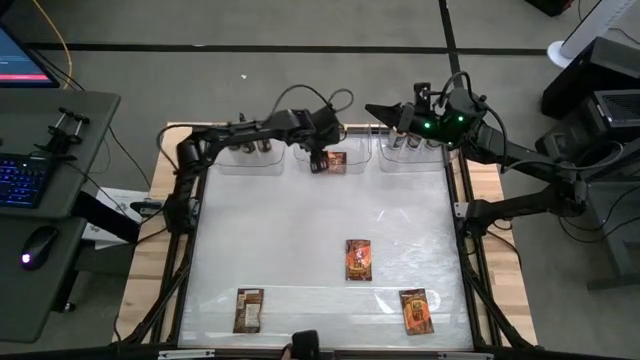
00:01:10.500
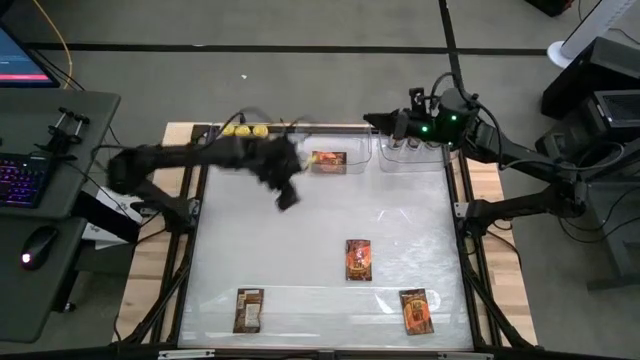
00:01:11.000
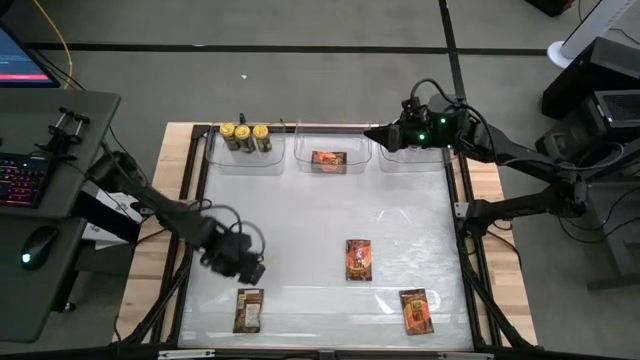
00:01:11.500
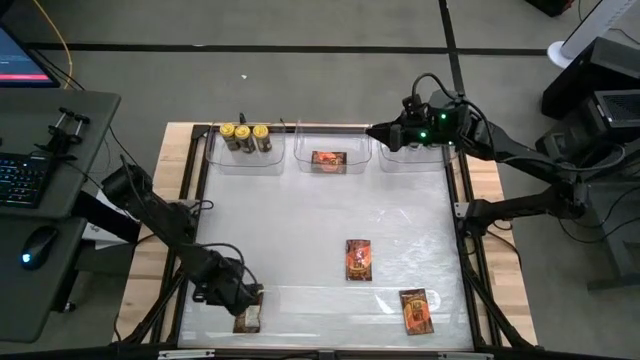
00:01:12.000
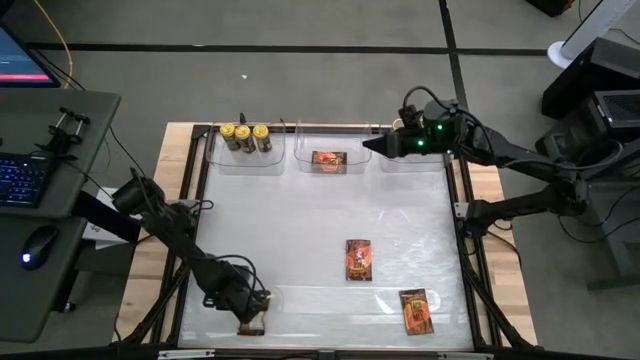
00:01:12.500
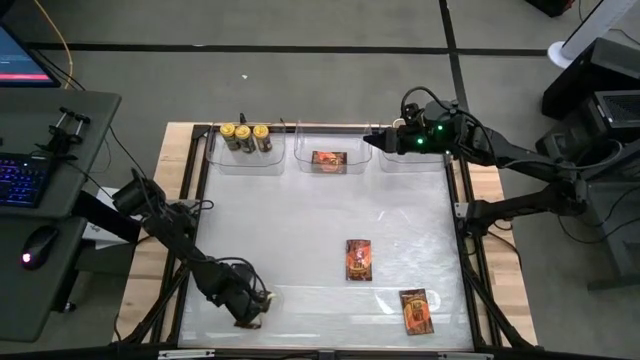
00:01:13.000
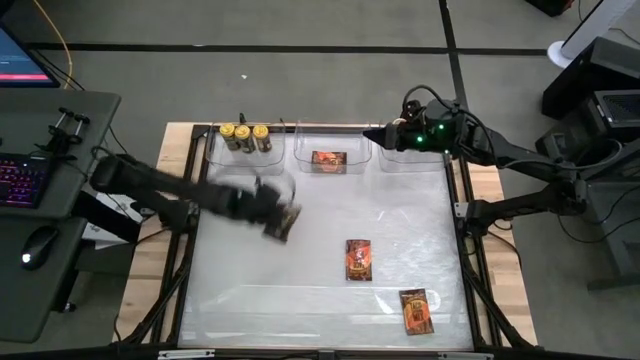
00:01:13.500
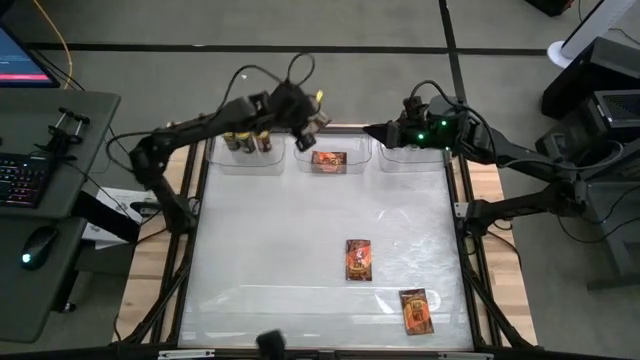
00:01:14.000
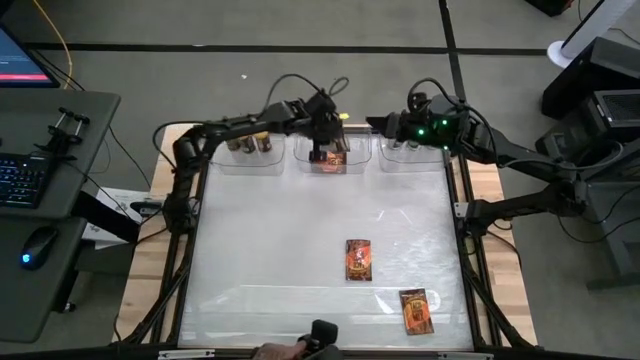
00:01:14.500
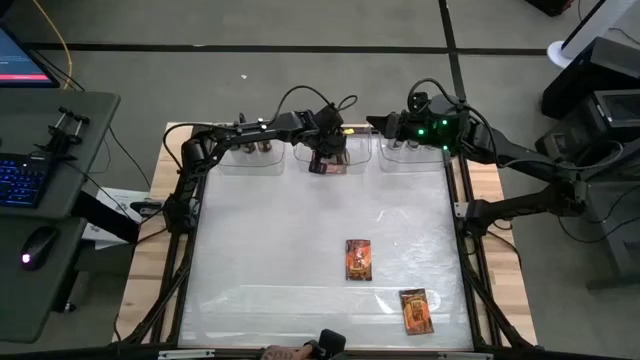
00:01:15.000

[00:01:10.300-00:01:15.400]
Task: Sort spices by type
Put the bottom left orange seasoning pack into the middle transparent bin

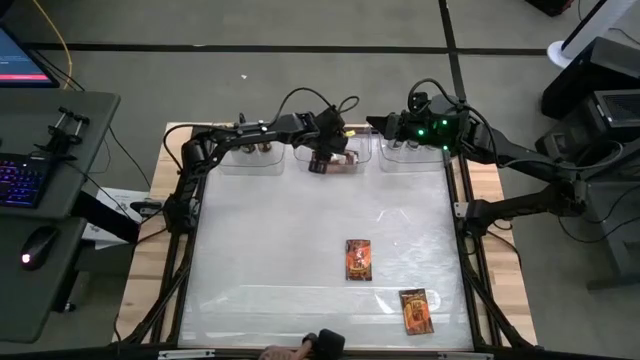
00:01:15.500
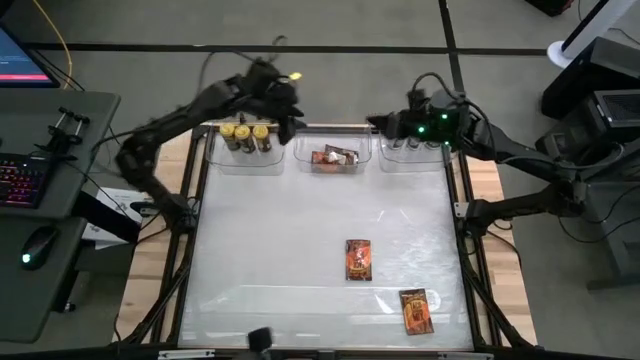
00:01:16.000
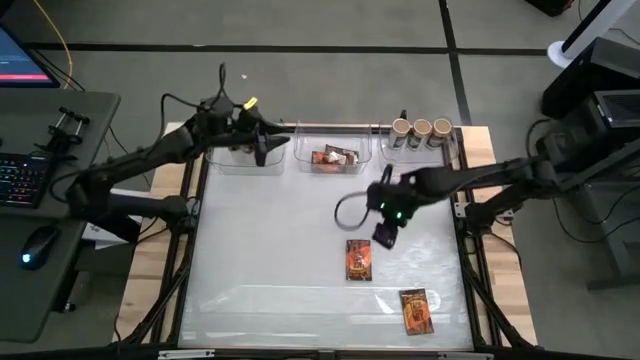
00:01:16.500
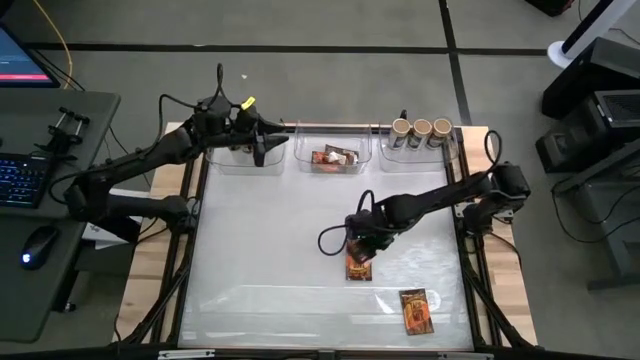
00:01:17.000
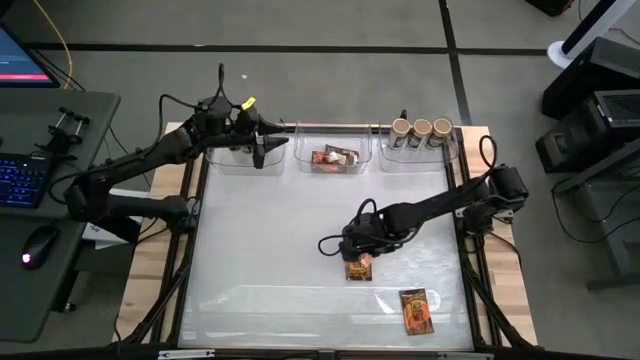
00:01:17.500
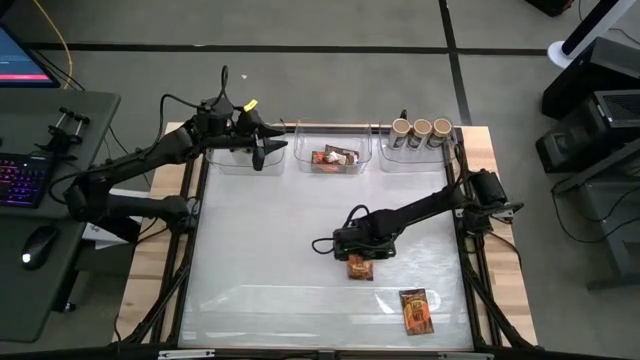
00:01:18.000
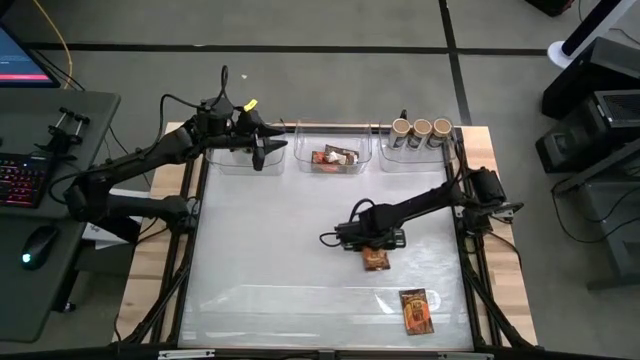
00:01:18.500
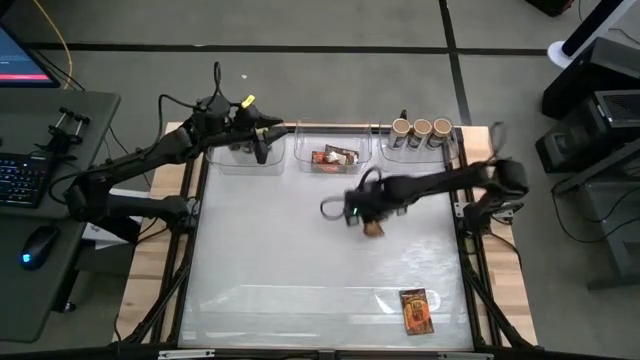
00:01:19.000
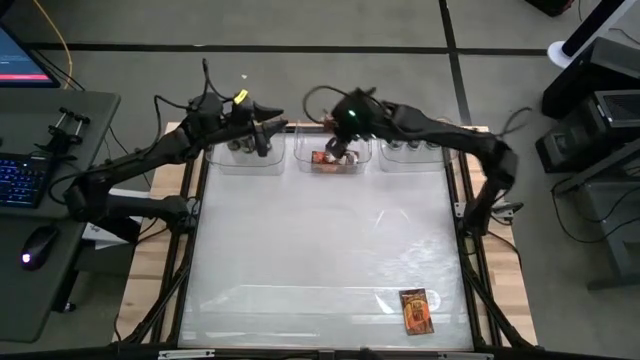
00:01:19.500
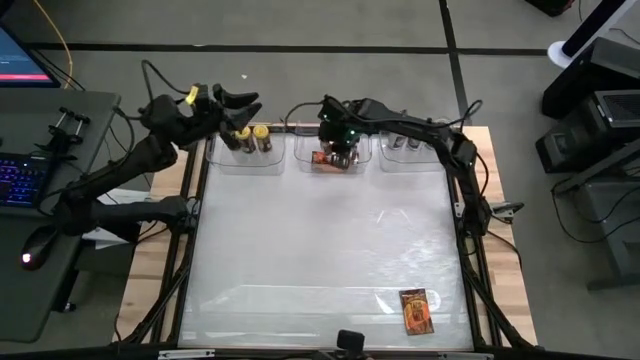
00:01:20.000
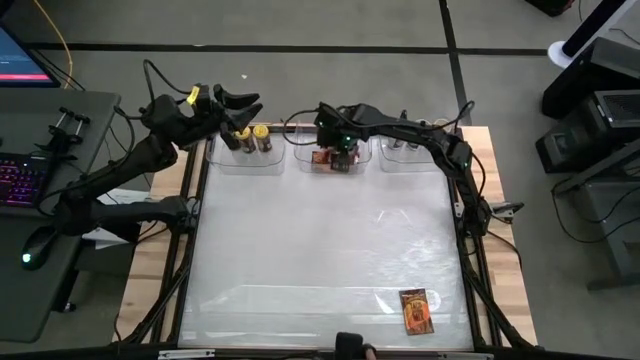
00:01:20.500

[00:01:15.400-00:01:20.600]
Put the top orange seasoning pack into the middle transparent bin

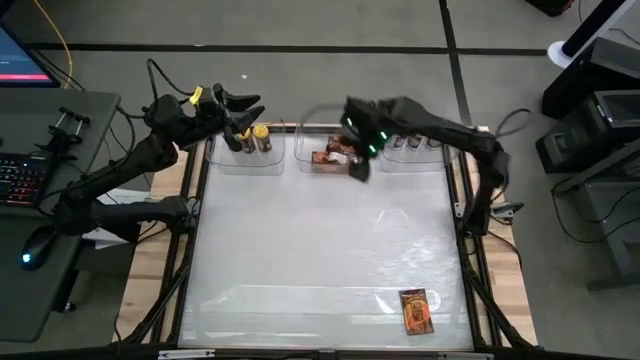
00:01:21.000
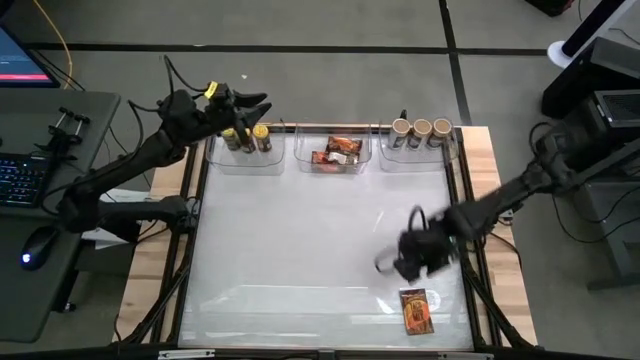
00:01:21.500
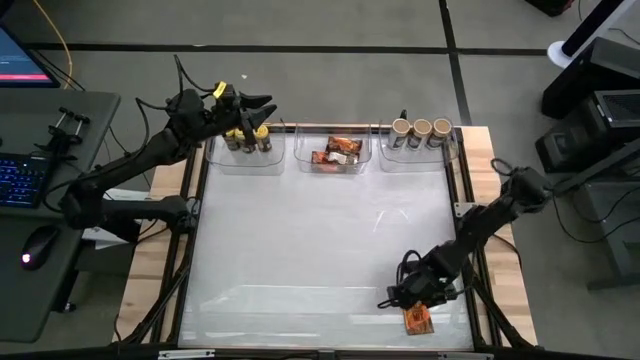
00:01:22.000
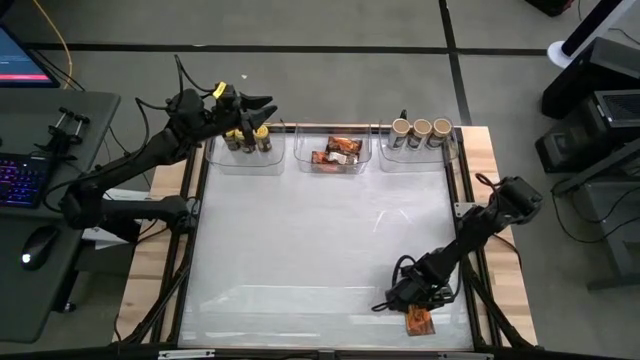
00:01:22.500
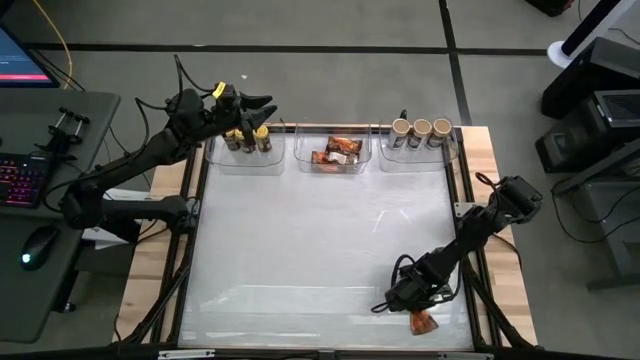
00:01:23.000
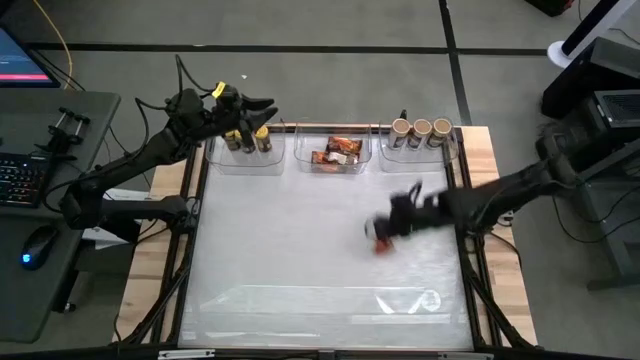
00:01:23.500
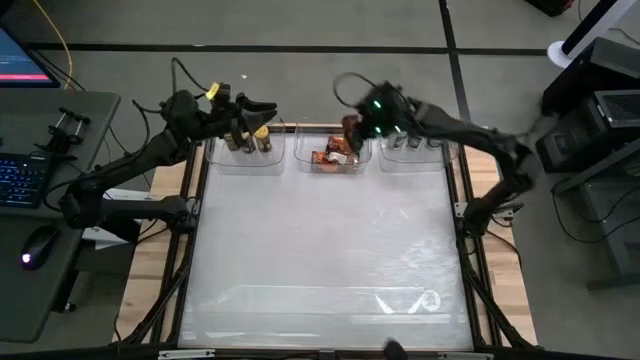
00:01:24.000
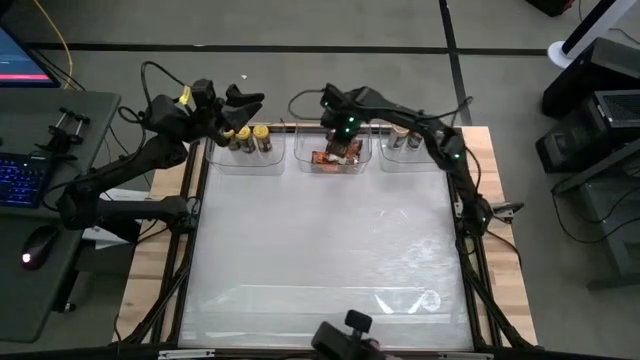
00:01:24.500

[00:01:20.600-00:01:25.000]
Put the orange seasoning pack into the middle transparent bin

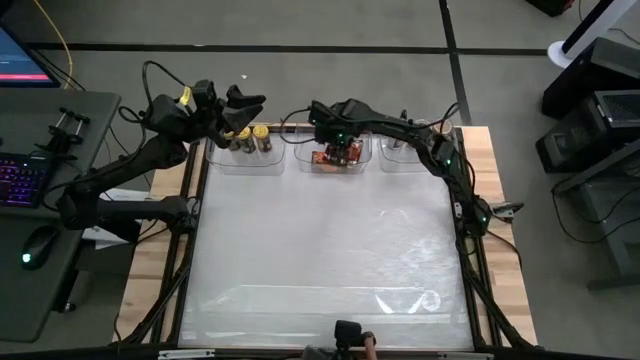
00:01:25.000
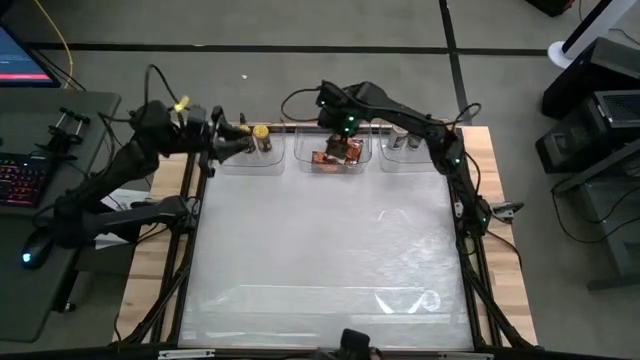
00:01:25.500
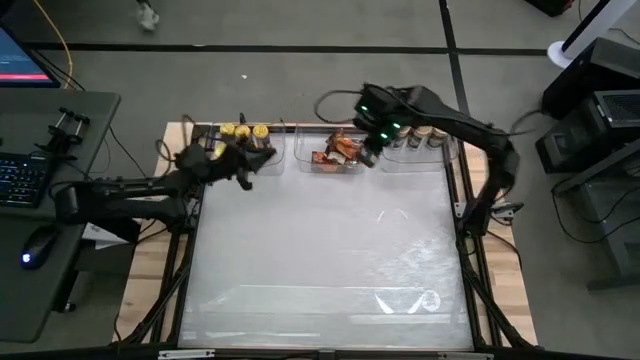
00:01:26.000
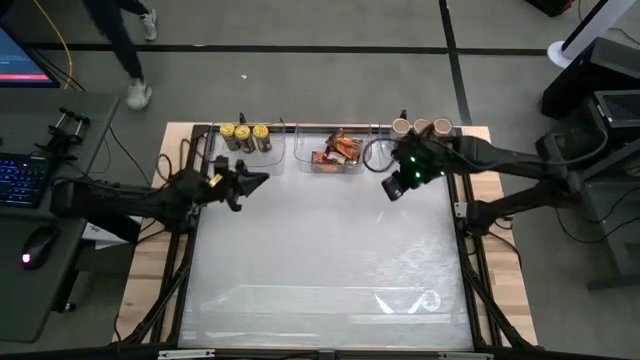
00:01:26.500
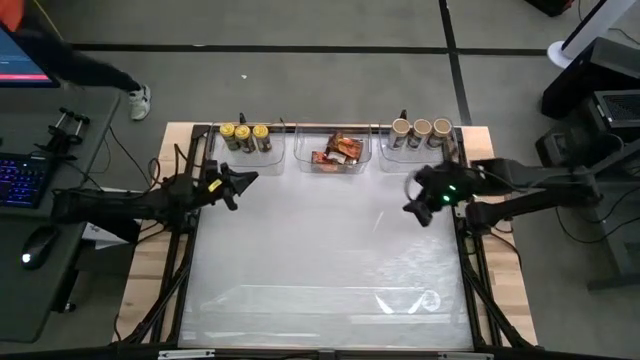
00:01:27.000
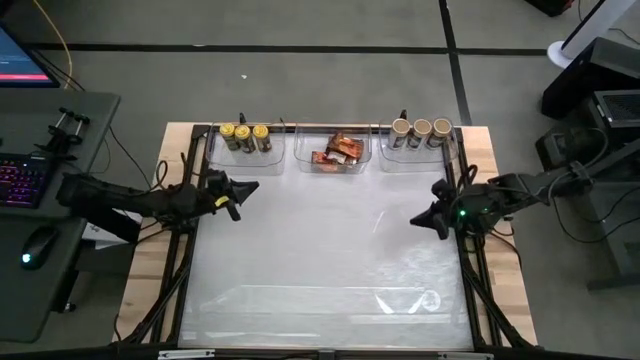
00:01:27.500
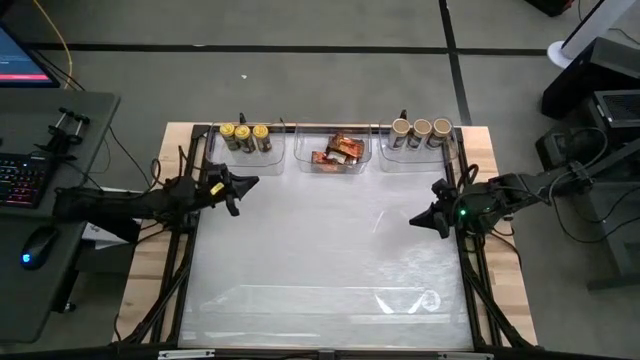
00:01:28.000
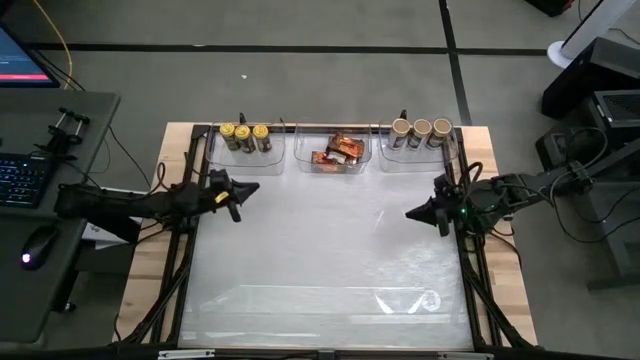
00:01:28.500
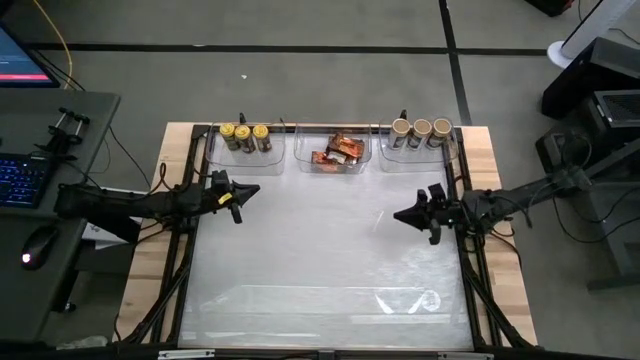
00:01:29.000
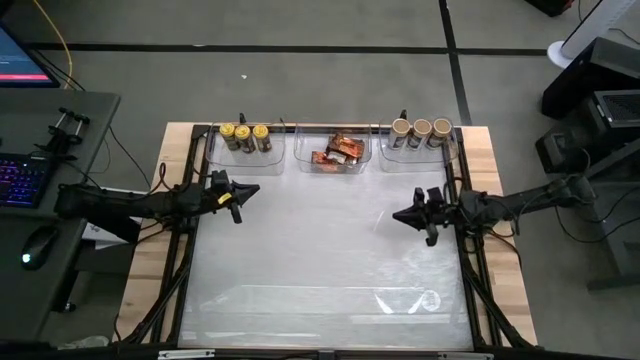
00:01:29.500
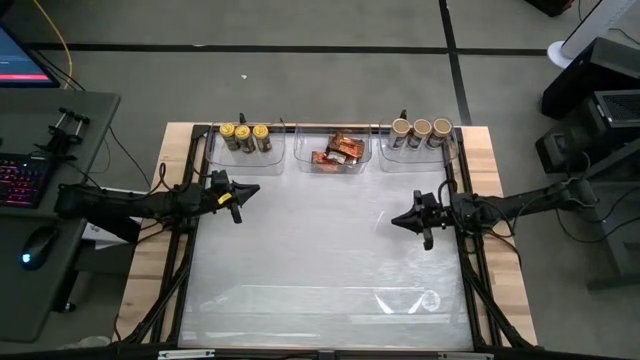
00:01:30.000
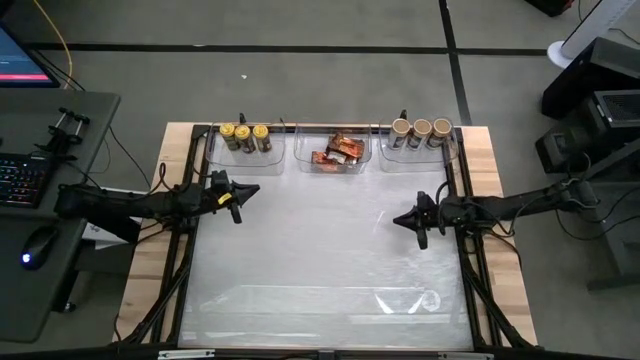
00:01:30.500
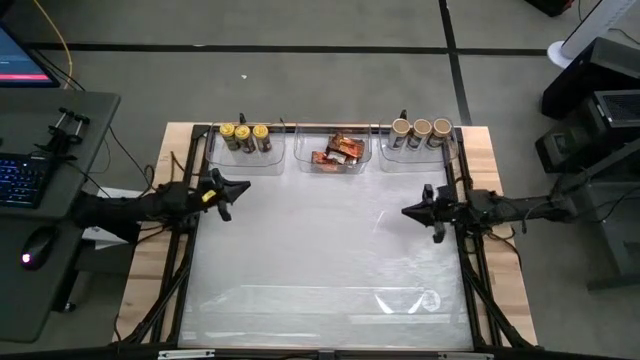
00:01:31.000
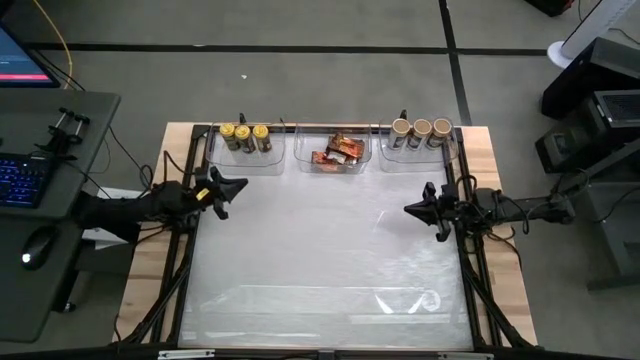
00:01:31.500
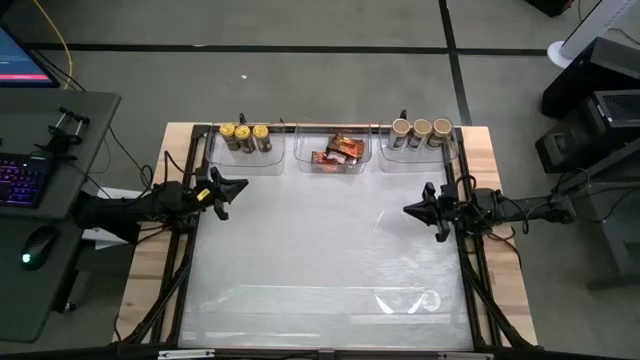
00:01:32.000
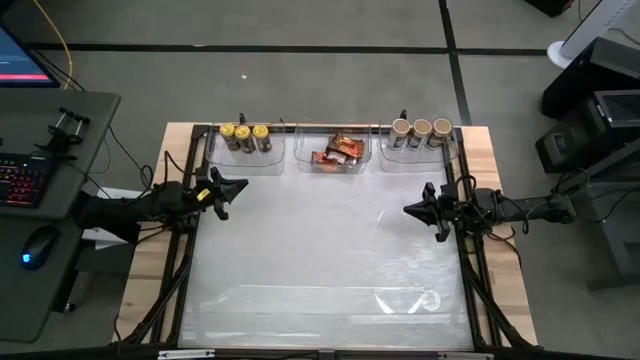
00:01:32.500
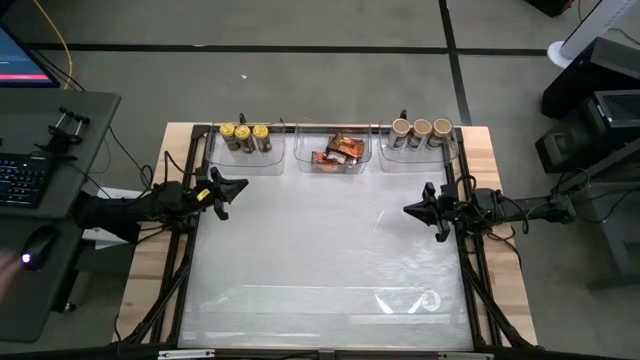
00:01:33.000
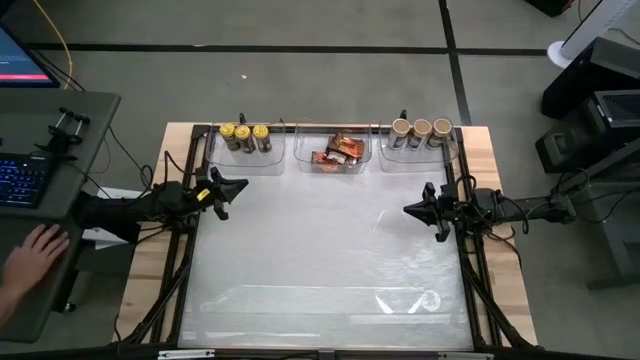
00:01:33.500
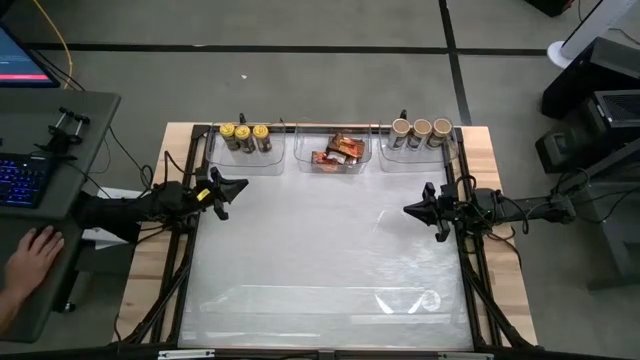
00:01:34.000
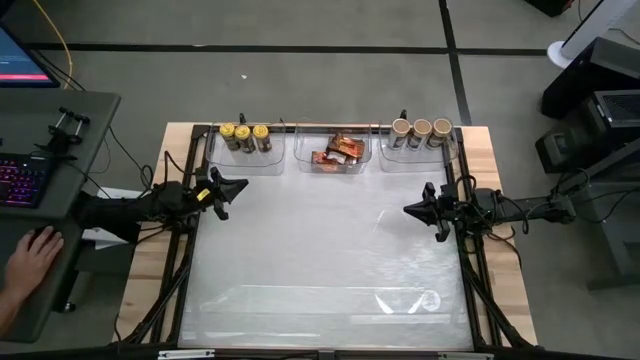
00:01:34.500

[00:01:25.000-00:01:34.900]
Return to Home Position
